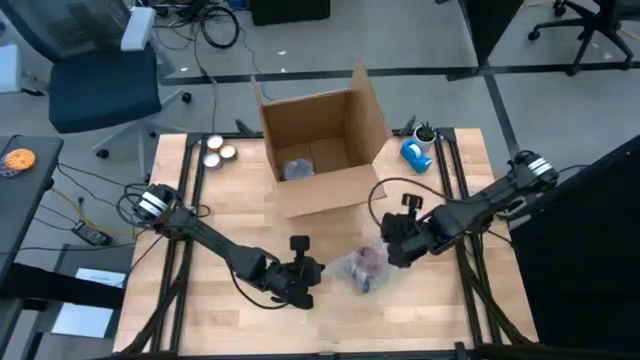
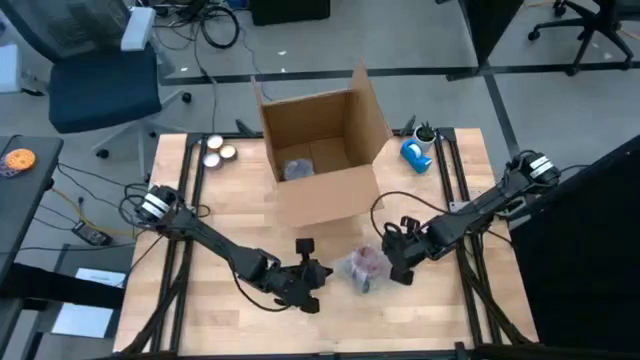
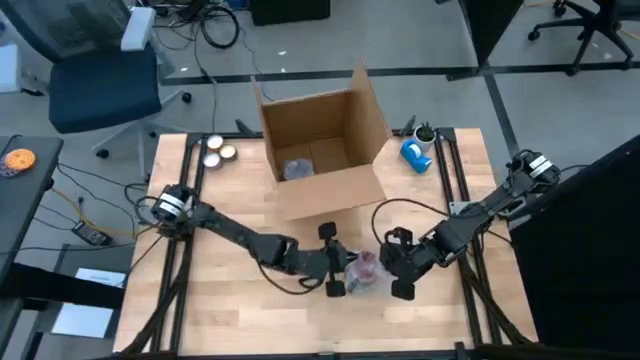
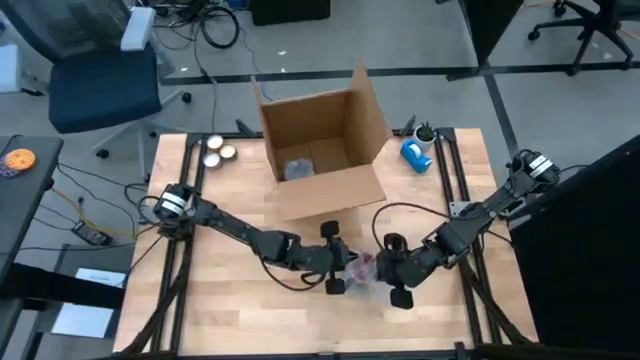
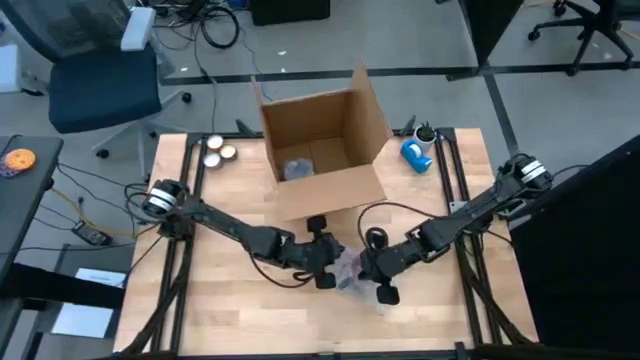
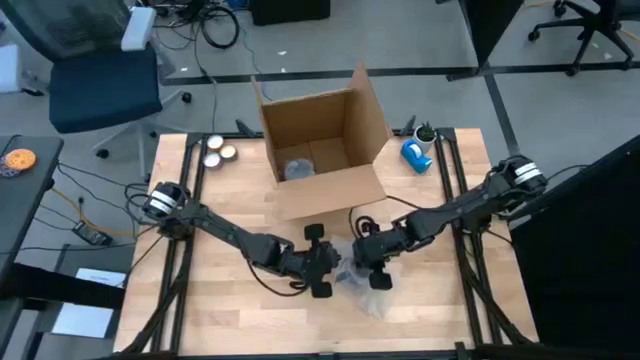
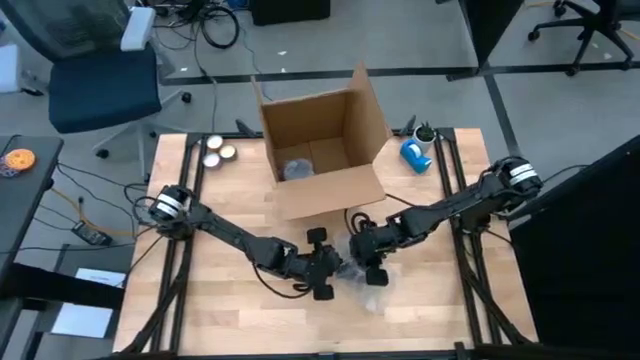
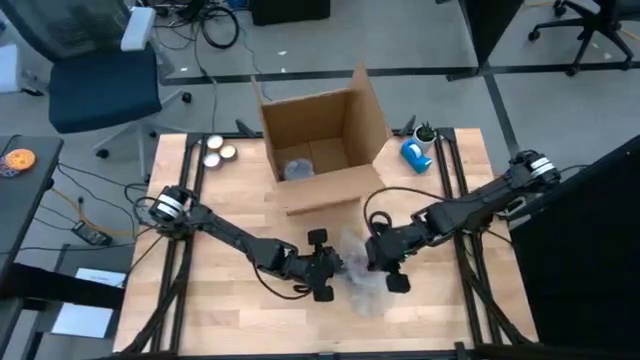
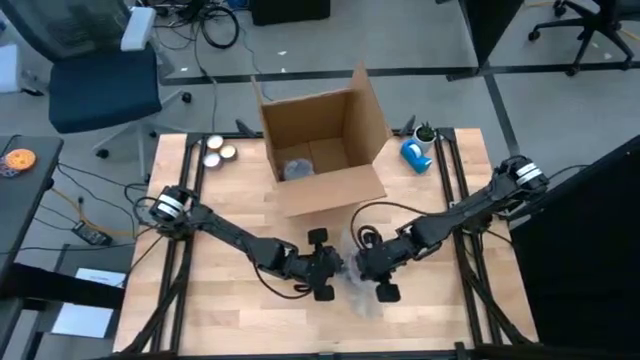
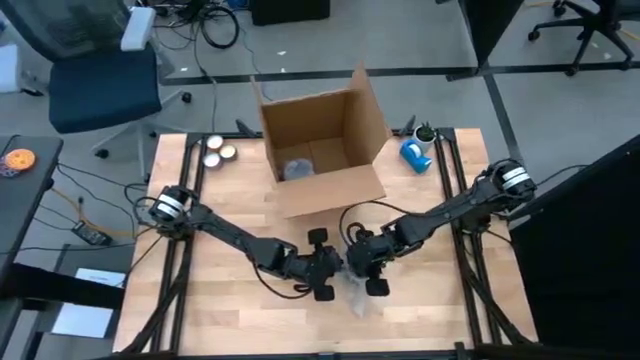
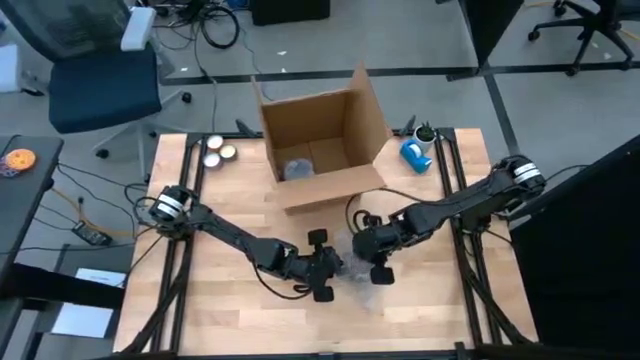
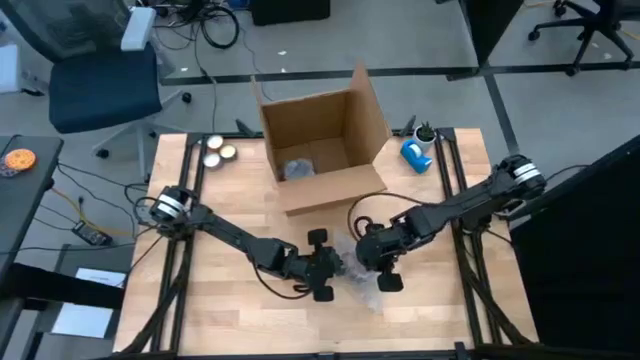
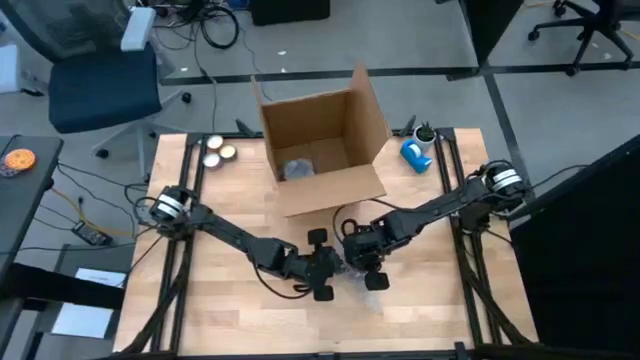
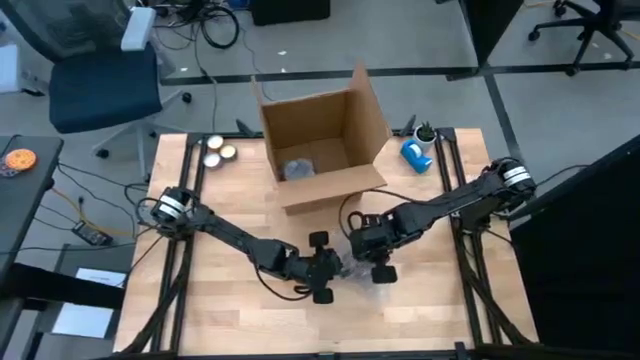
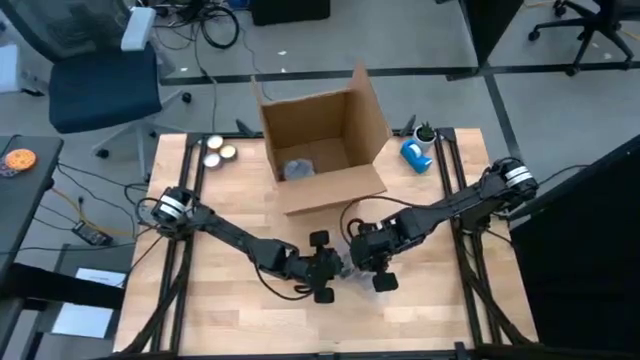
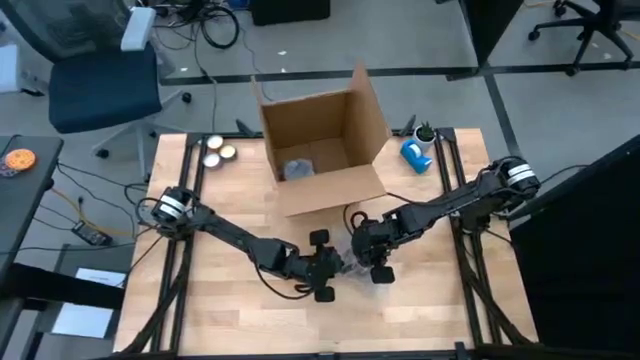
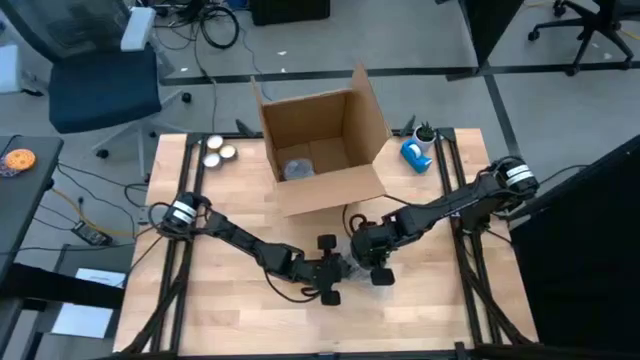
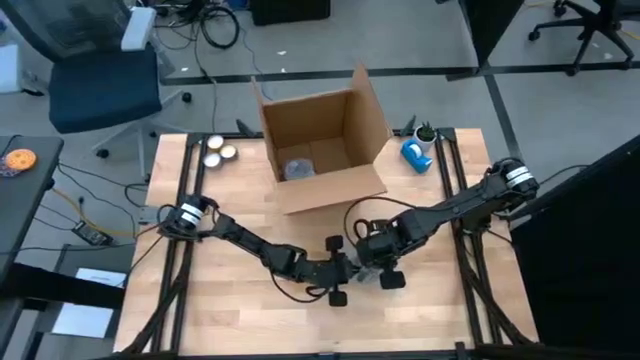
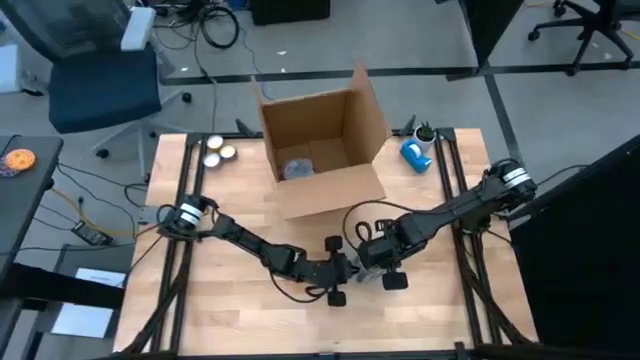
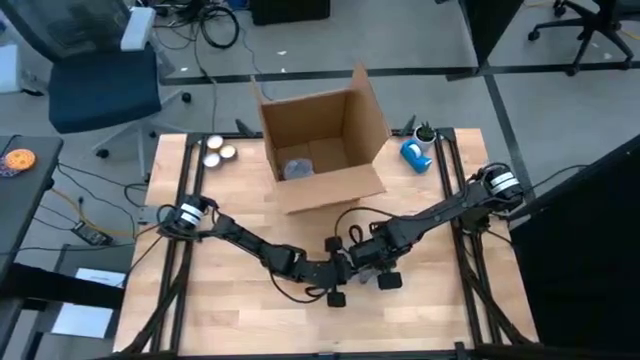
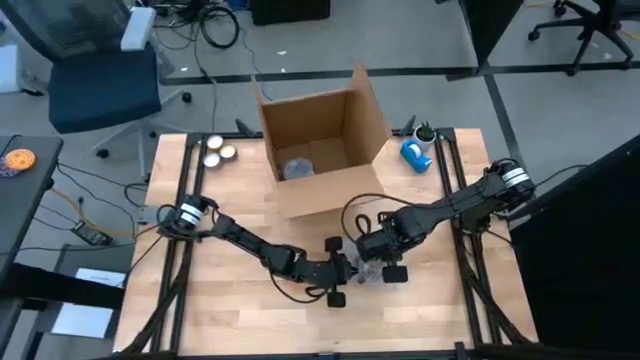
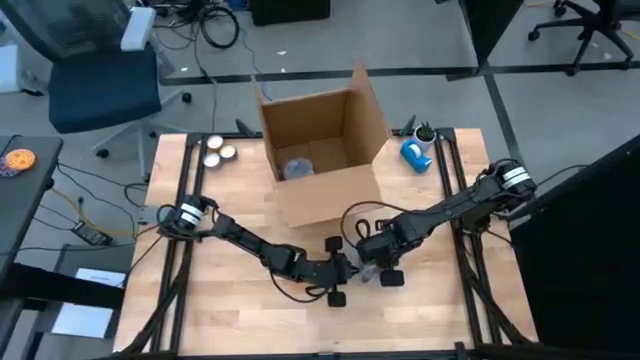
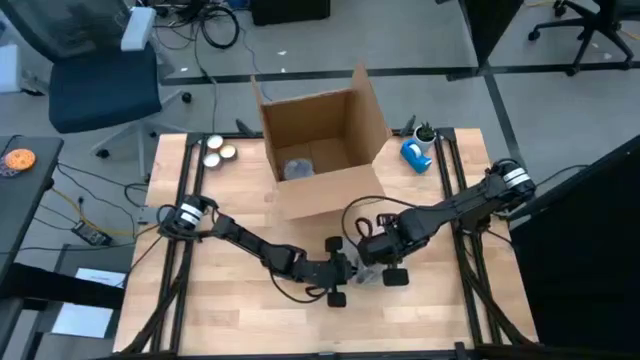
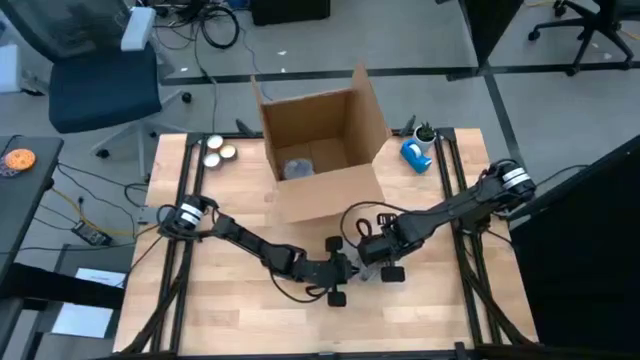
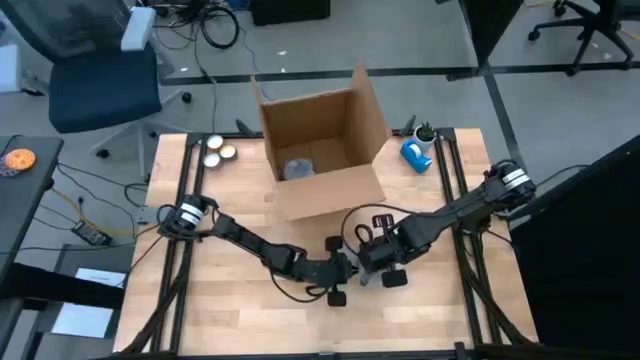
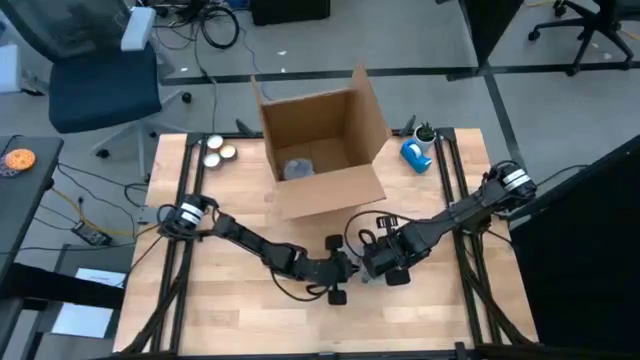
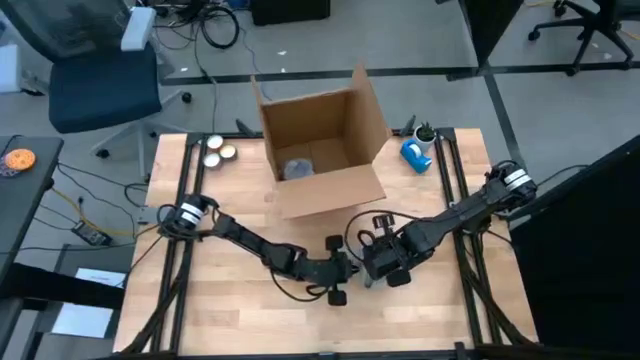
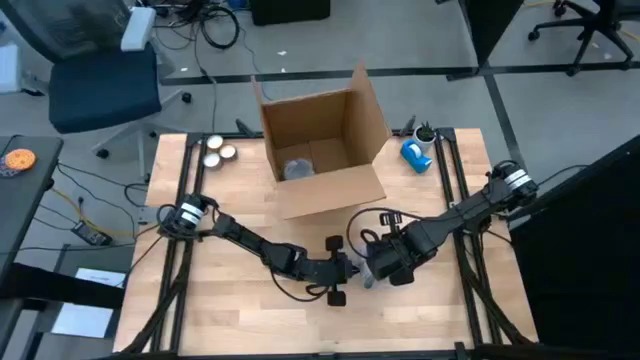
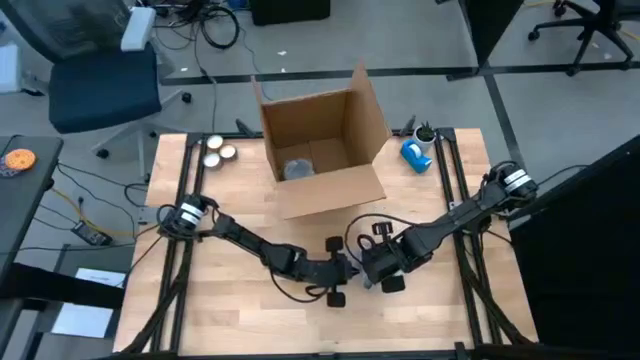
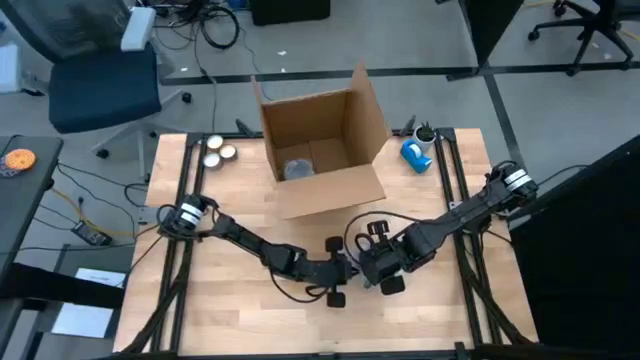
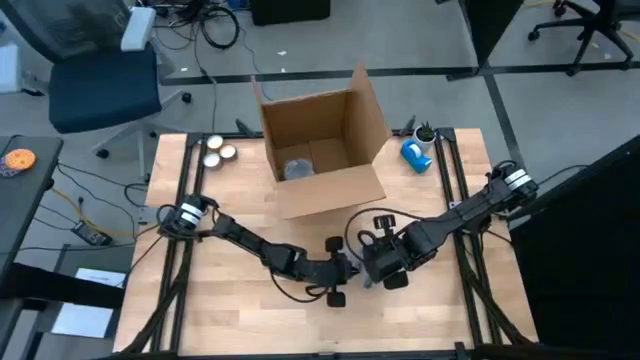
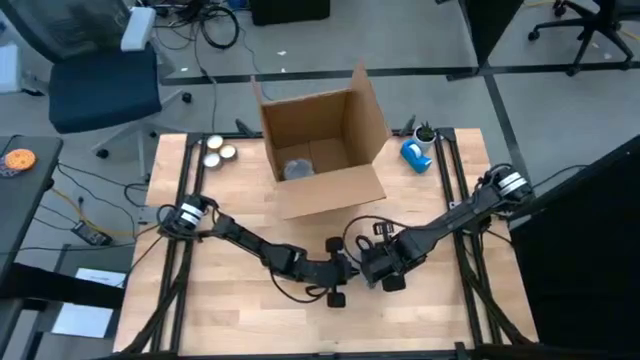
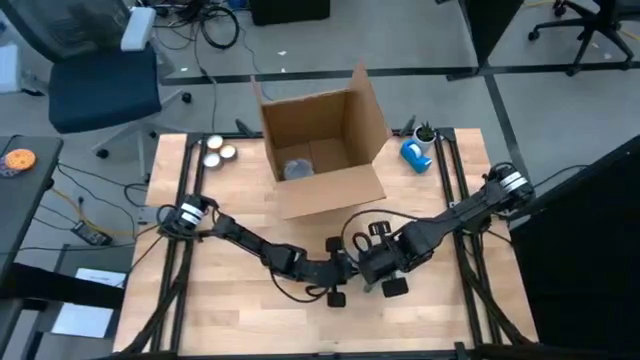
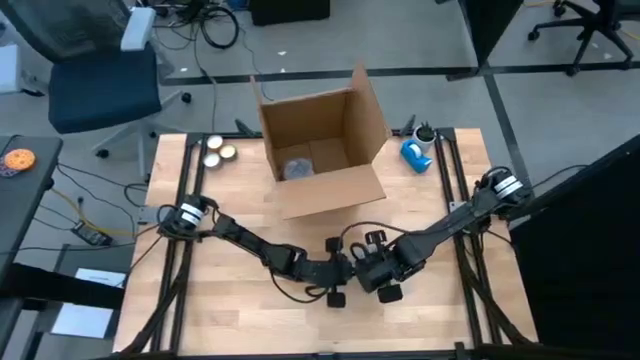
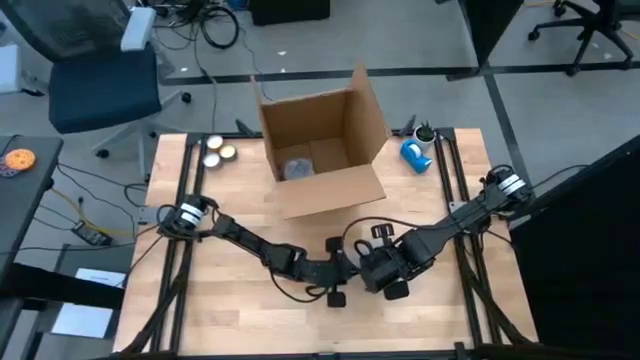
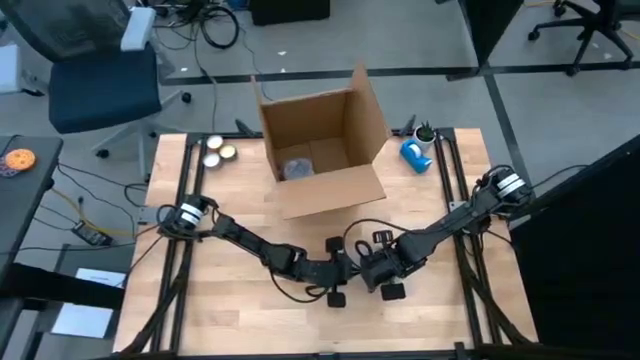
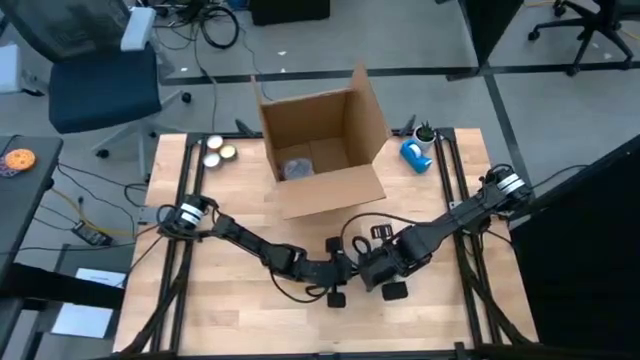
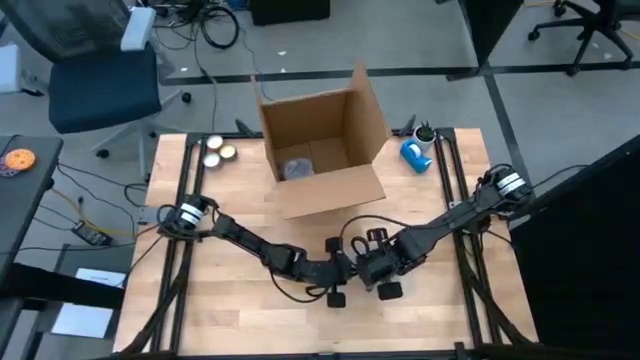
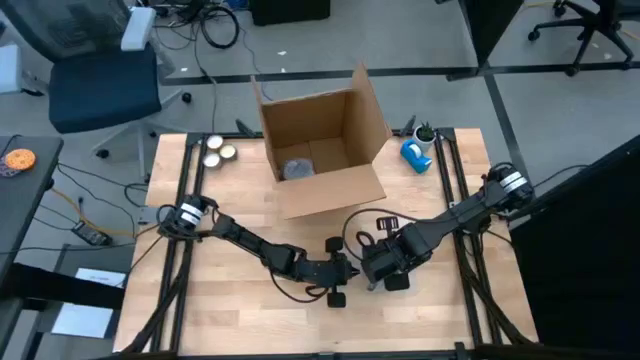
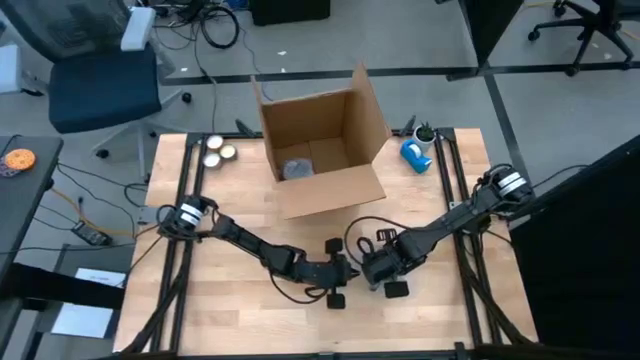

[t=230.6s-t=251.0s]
Task: wrap mug
Wrap the black mug with the bubble wrap
